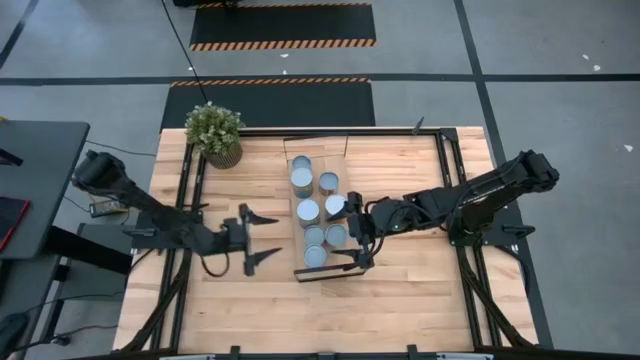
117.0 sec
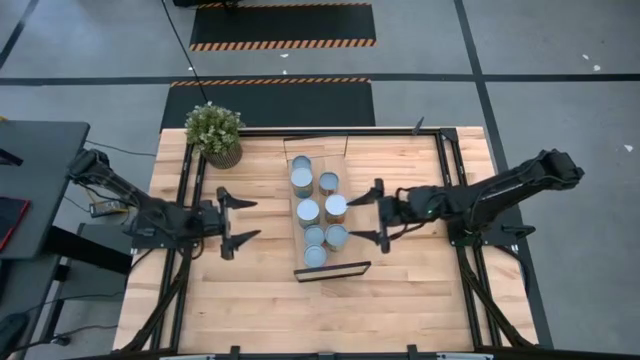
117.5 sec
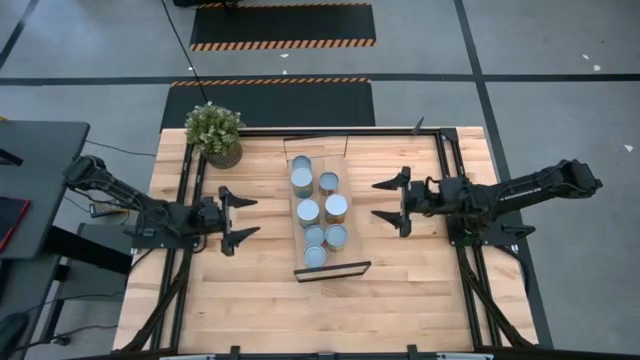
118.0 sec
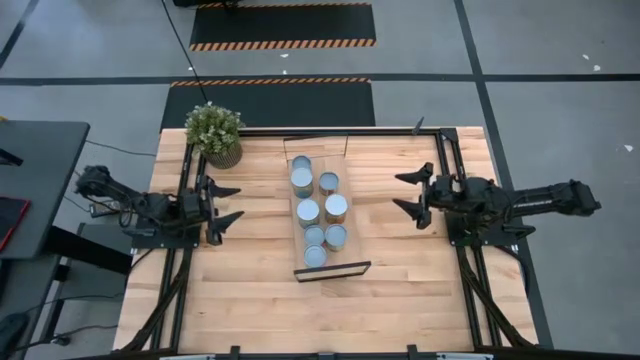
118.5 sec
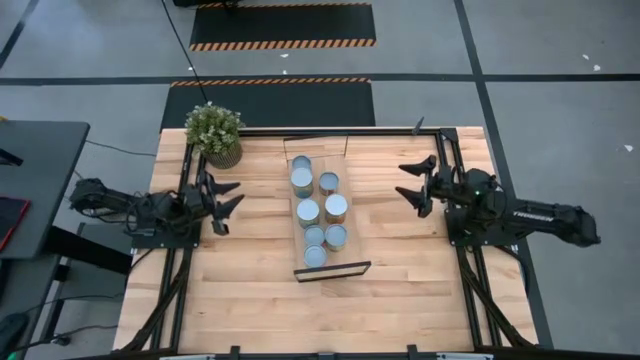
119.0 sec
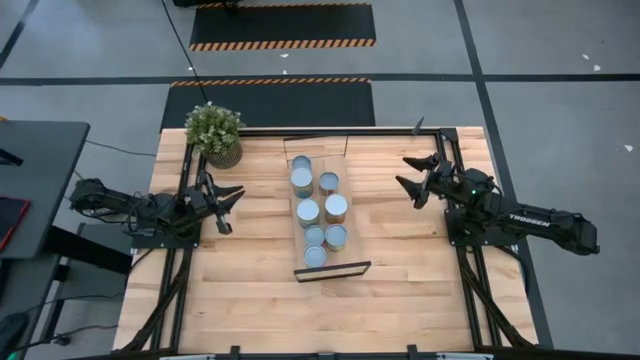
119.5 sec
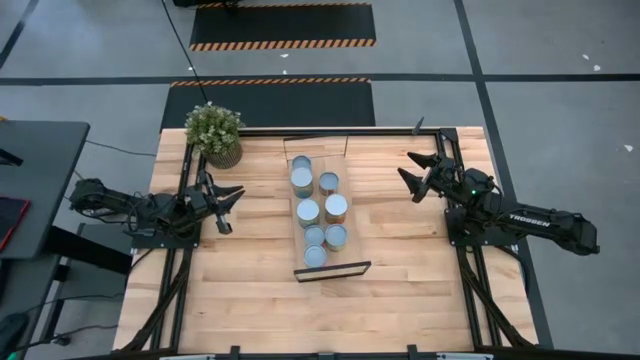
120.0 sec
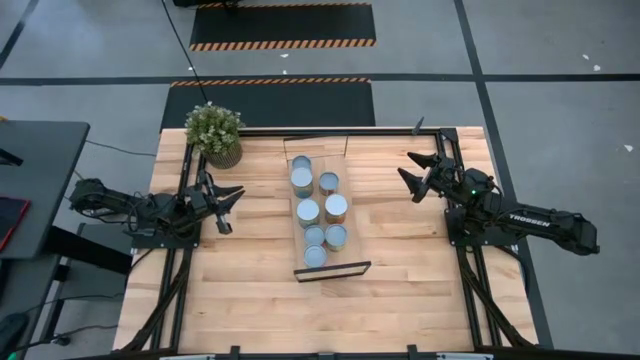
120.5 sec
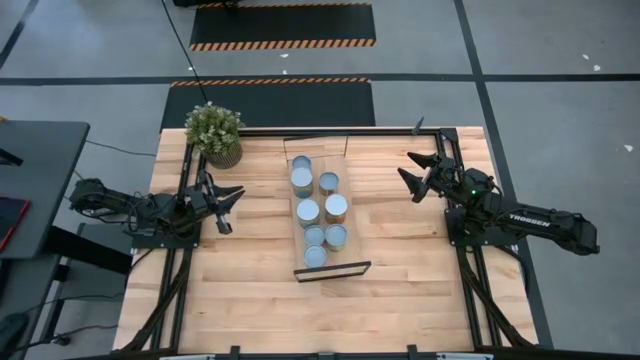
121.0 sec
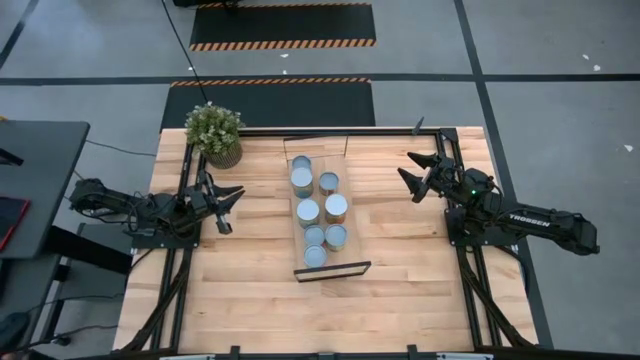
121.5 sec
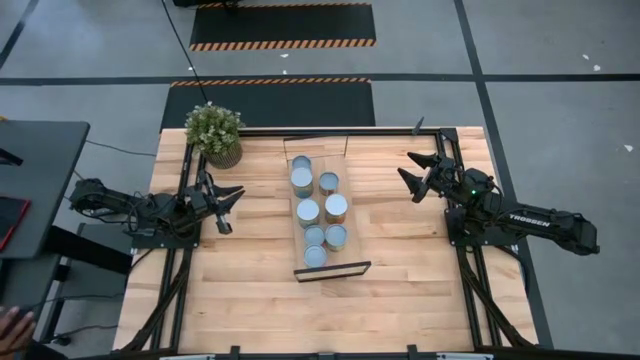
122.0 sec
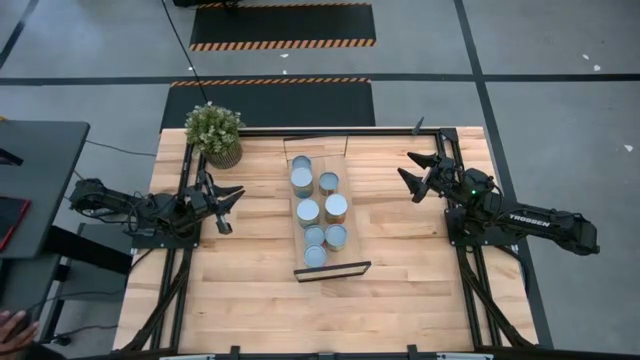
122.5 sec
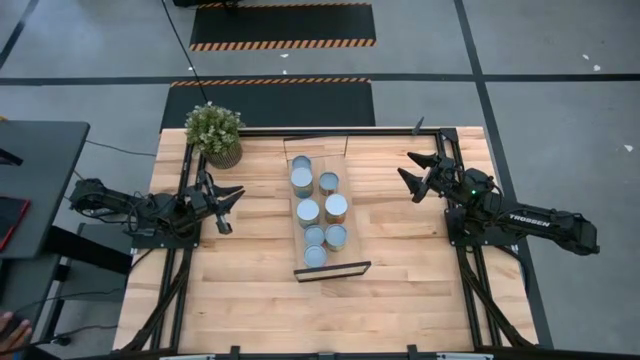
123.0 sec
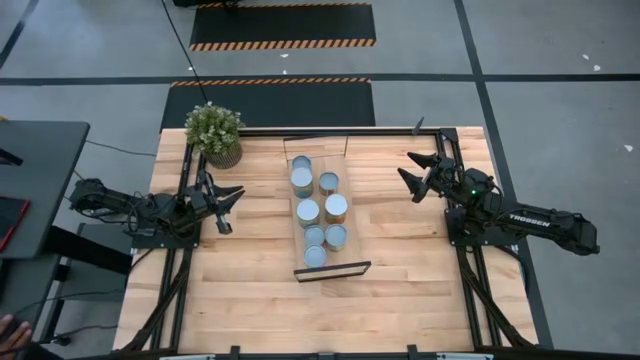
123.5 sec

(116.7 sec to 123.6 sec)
Task: Pick and place cans onto a shelf
Return to Home Position

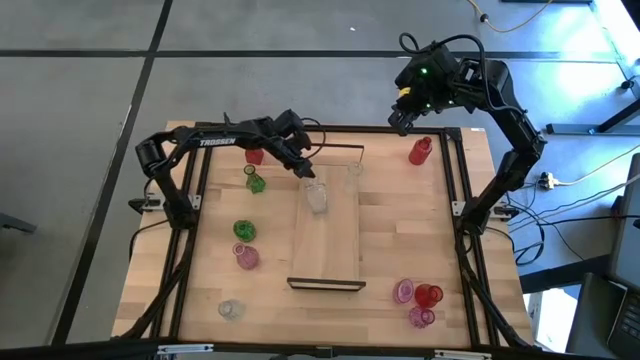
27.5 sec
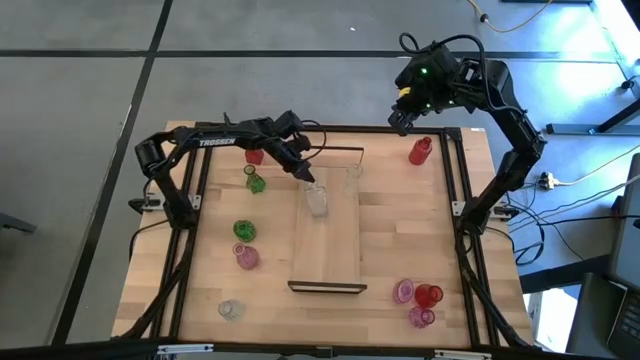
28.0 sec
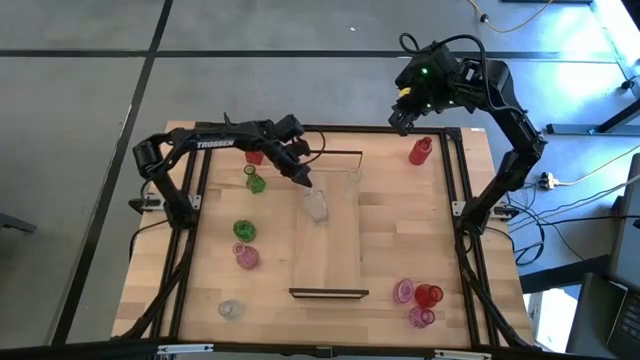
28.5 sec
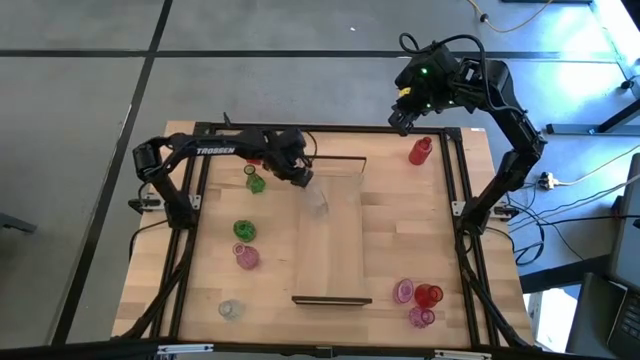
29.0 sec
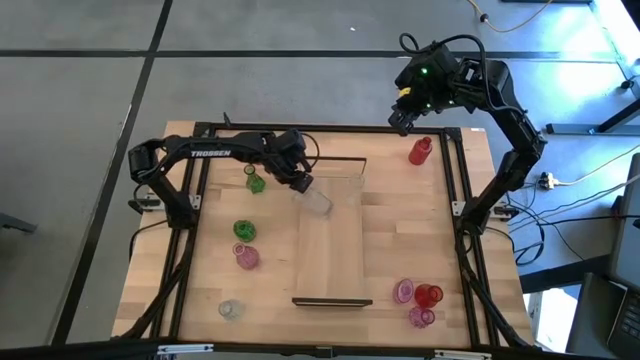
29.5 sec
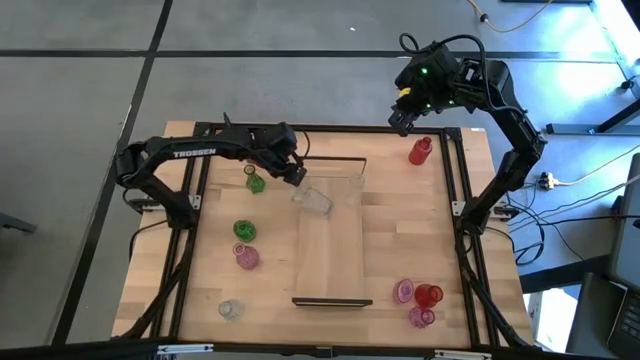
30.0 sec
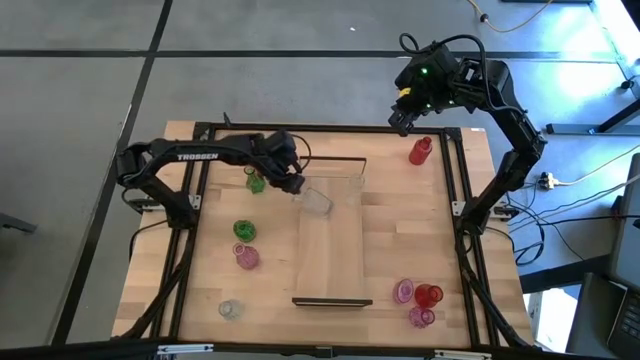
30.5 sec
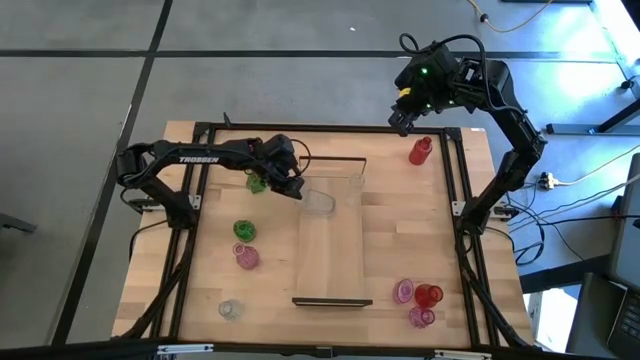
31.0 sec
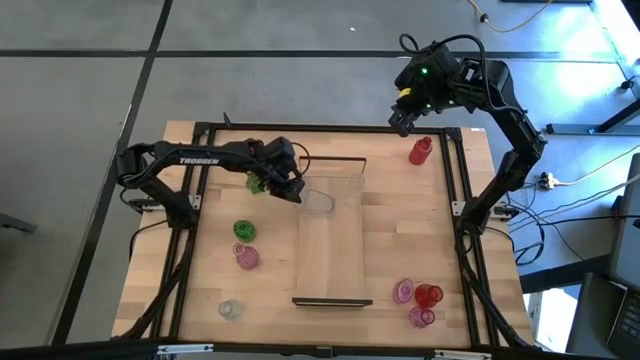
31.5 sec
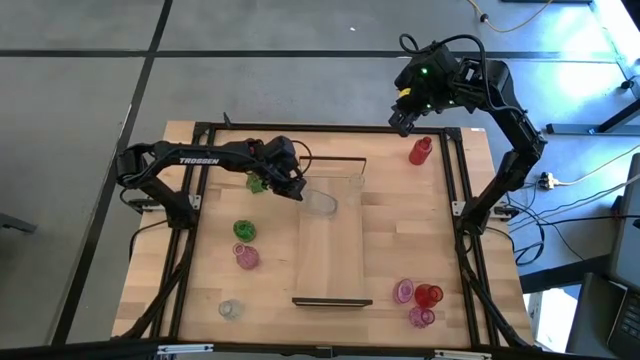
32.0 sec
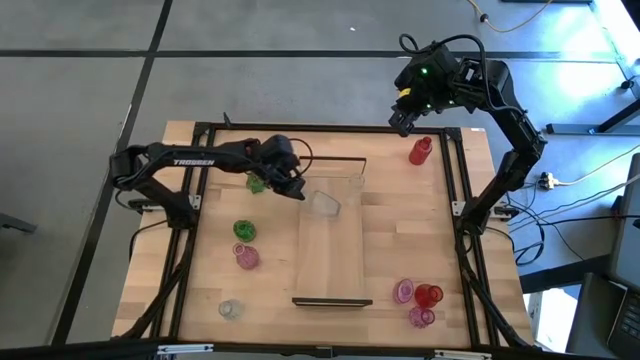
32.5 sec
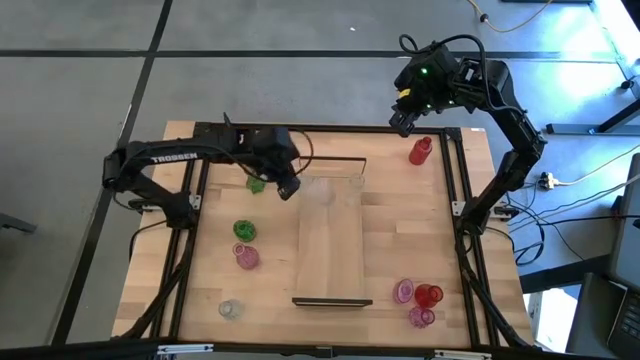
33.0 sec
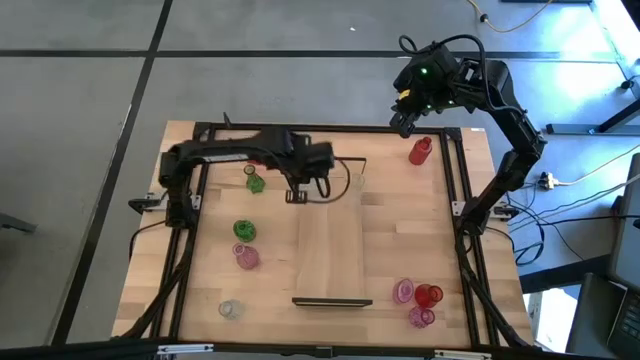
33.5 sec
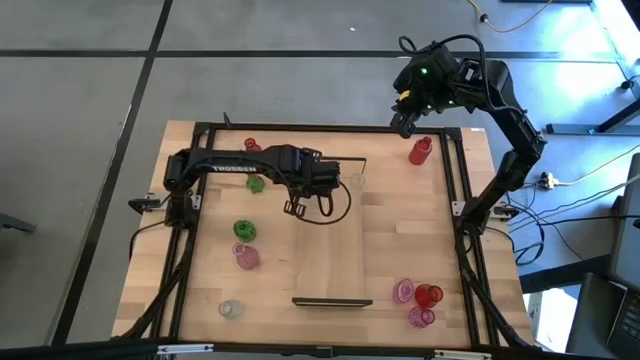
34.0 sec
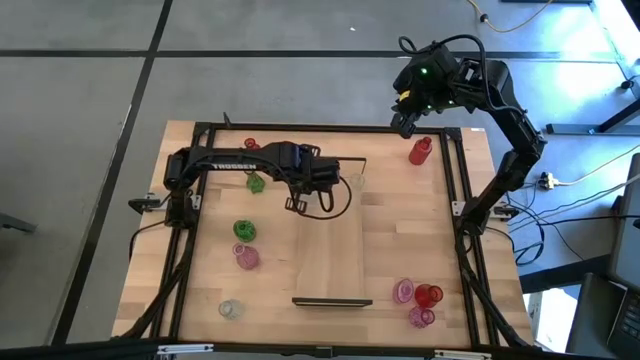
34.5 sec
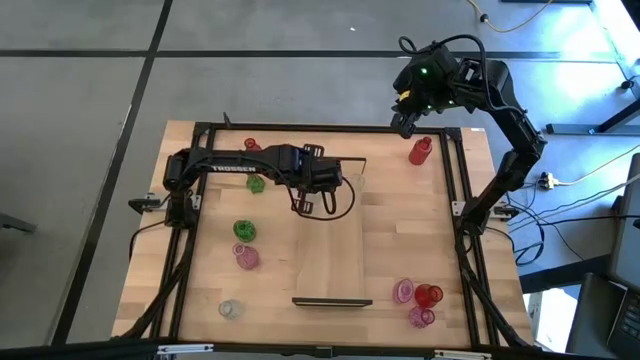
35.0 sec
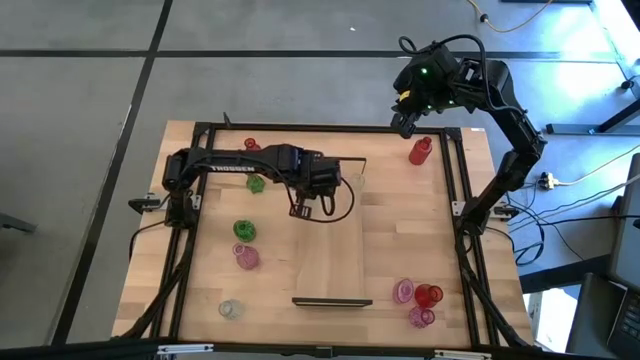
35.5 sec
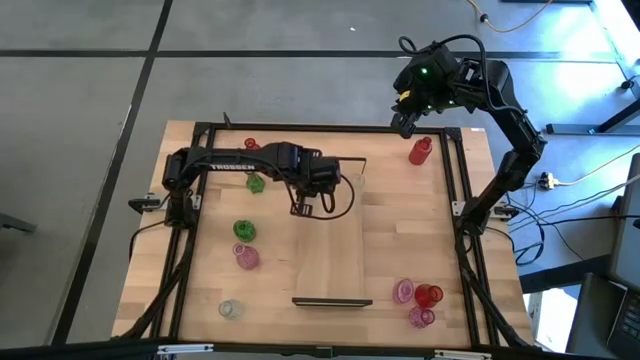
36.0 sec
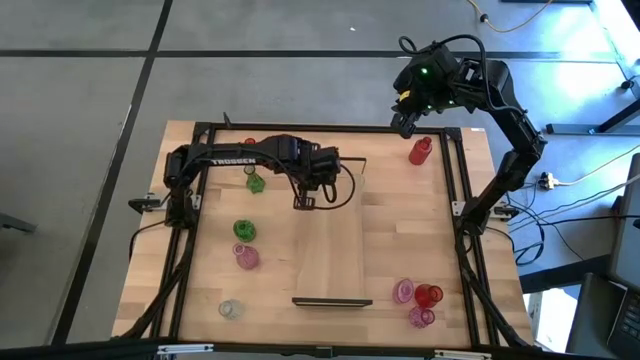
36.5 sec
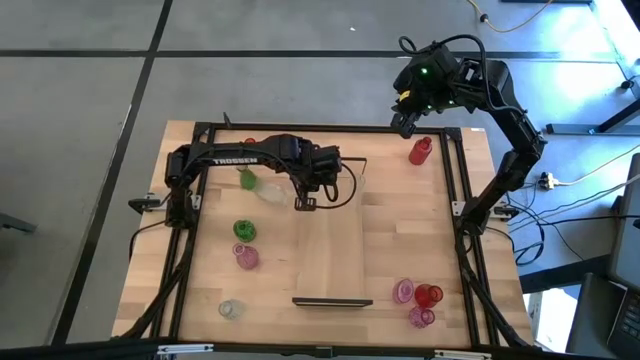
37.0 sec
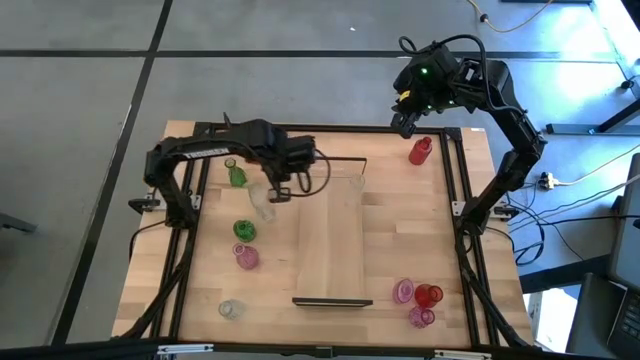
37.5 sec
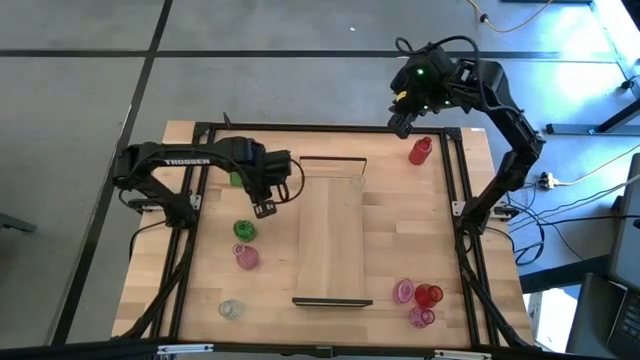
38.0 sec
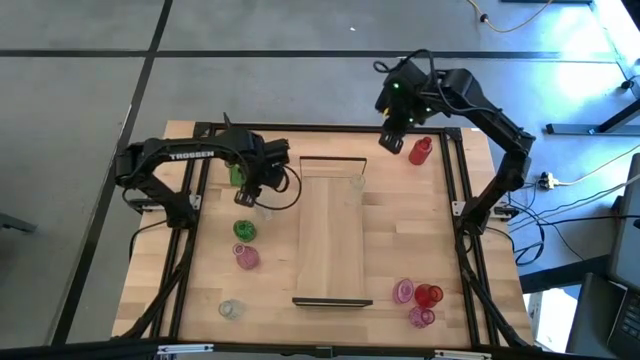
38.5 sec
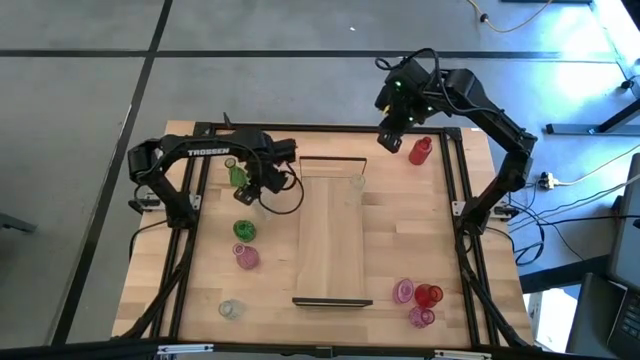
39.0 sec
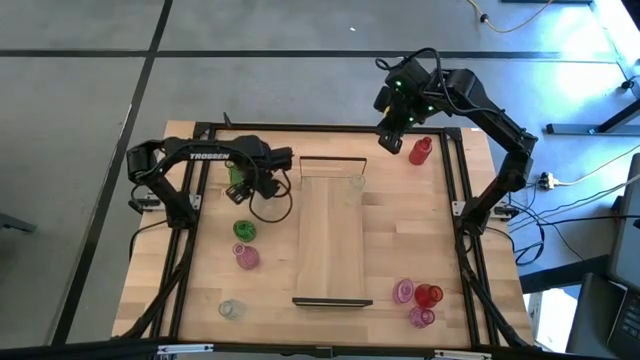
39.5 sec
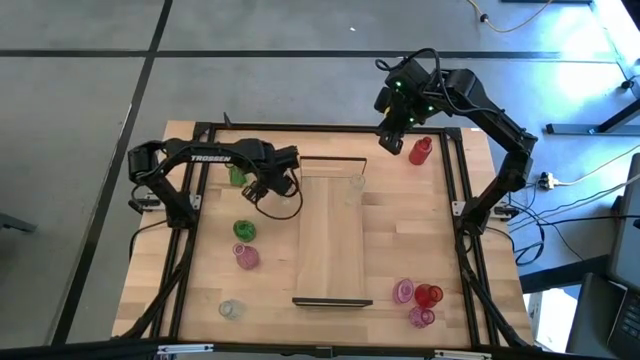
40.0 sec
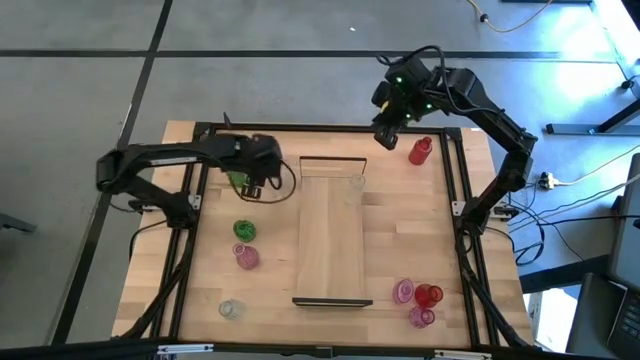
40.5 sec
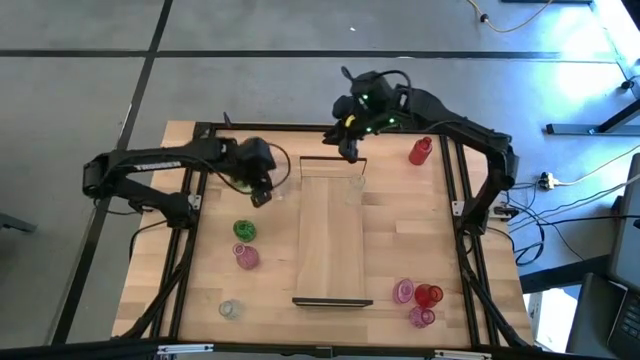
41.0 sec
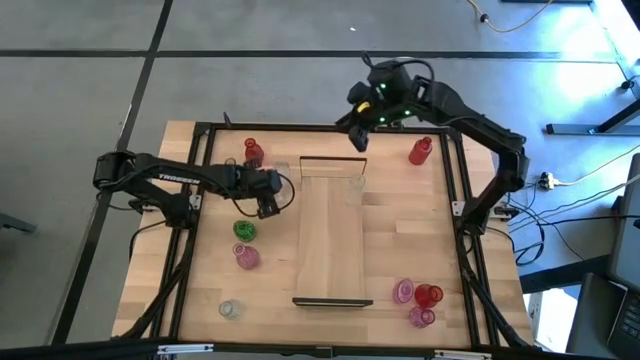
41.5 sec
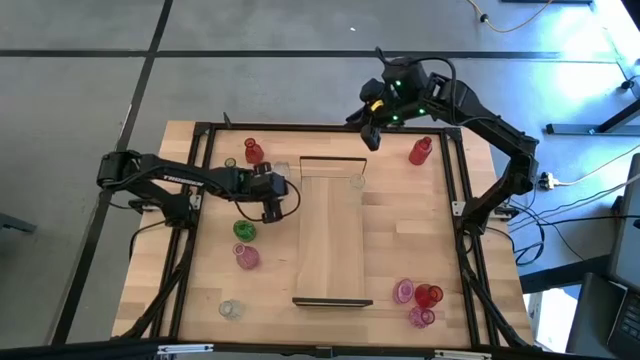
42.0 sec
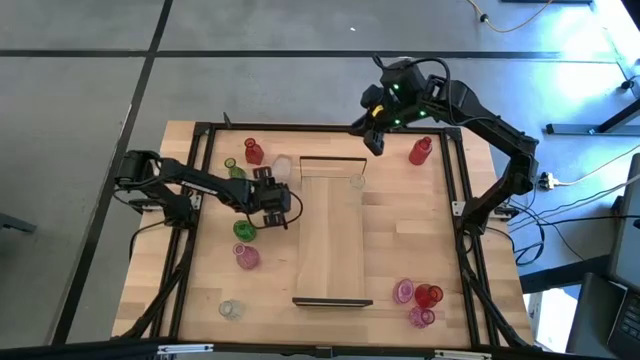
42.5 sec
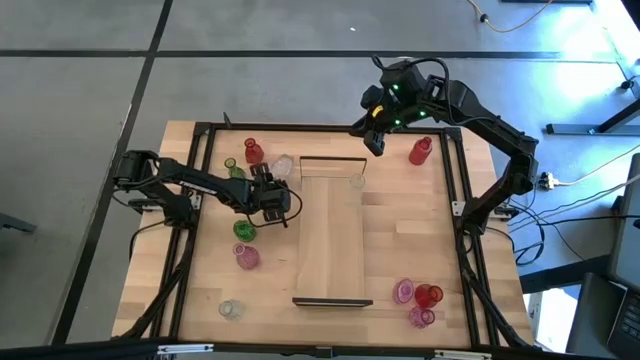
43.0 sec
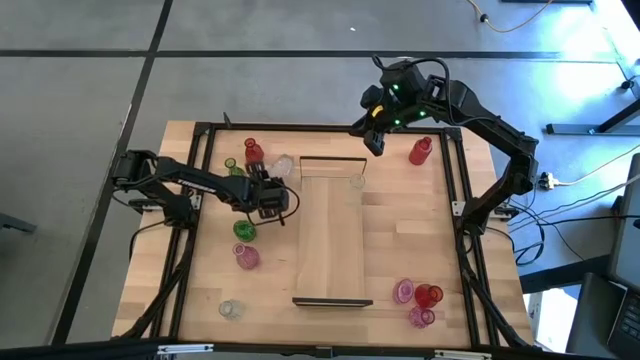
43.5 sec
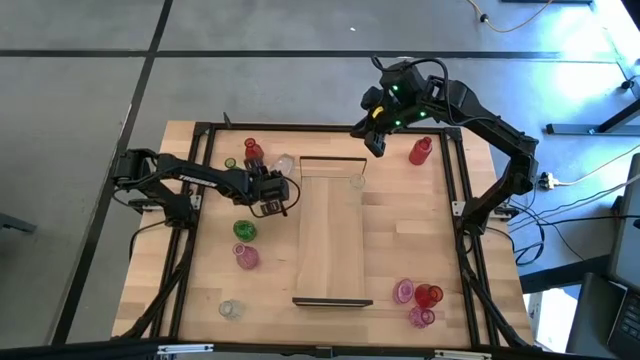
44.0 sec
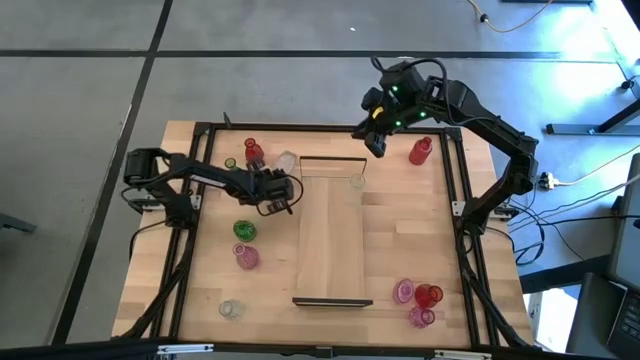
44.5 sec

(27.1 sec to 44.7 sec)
Task: sort vases onto shelf
Put the top transparent vase aligned with the other transparent vase on the shelf
